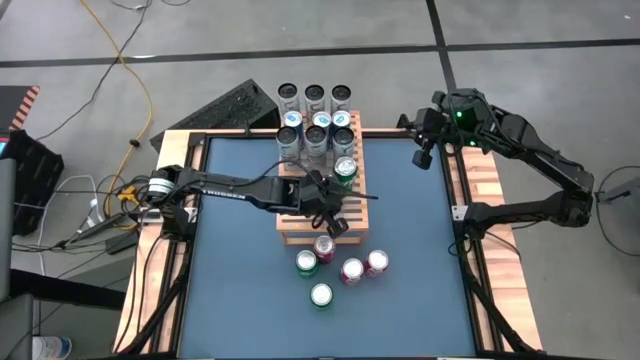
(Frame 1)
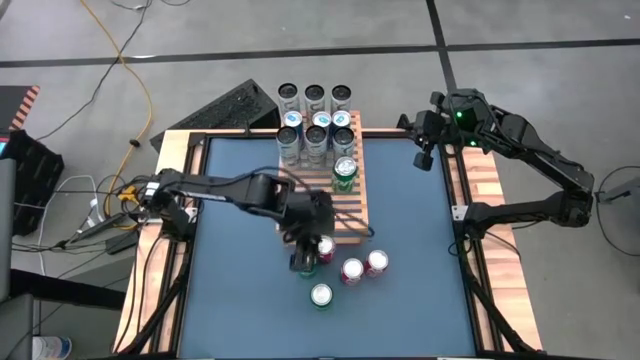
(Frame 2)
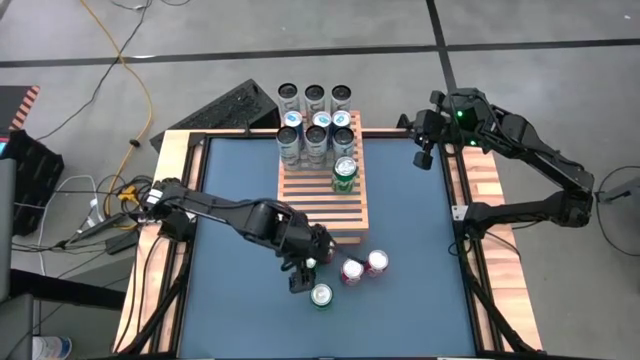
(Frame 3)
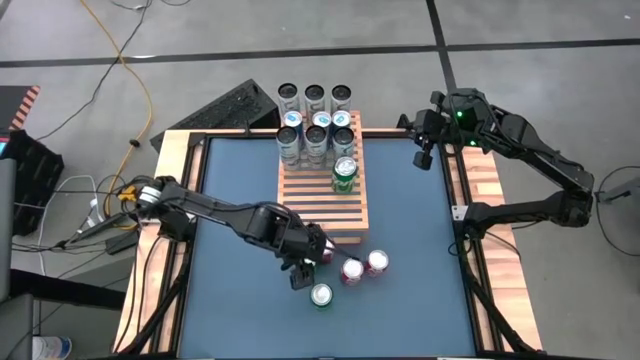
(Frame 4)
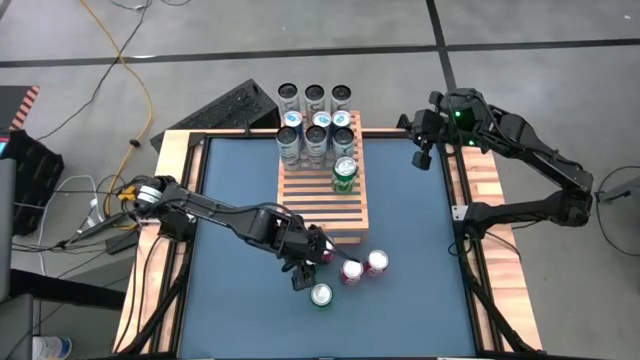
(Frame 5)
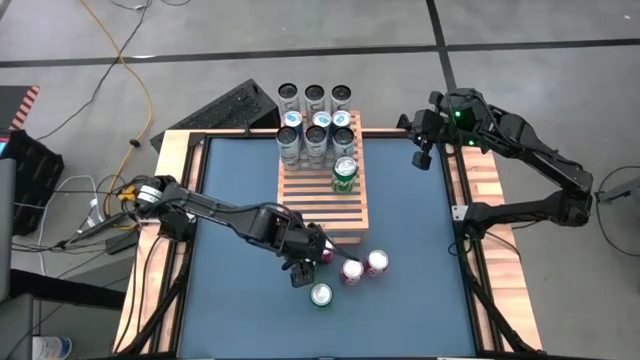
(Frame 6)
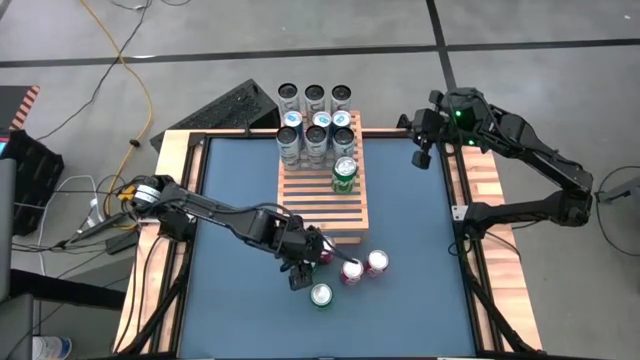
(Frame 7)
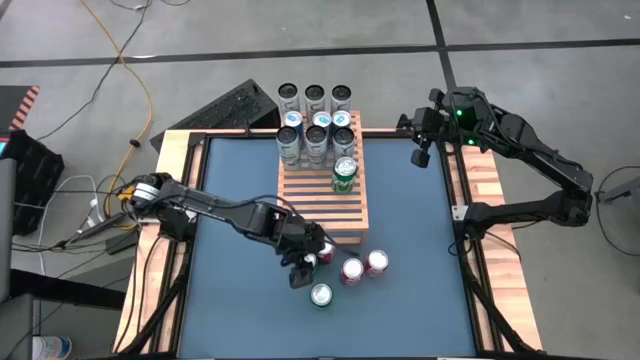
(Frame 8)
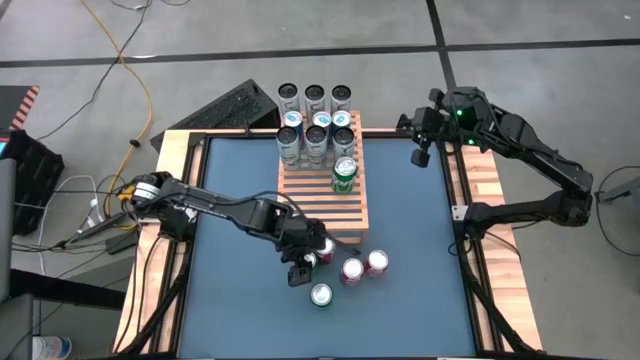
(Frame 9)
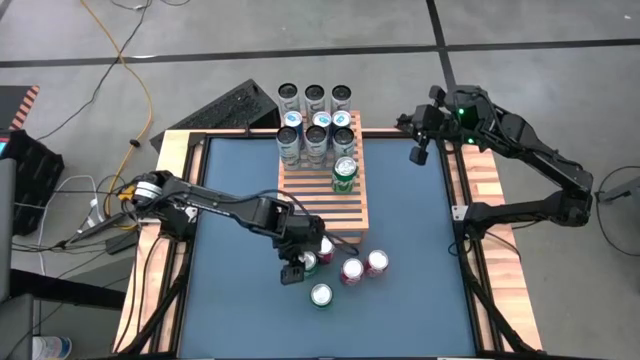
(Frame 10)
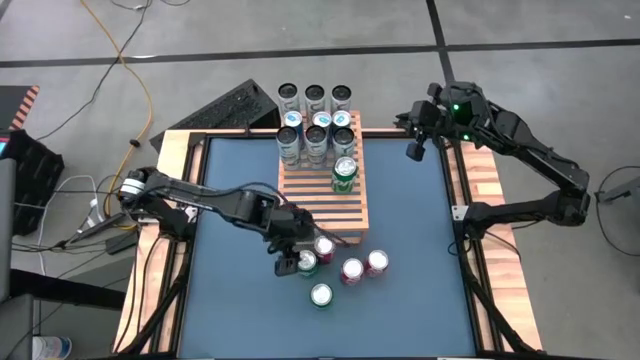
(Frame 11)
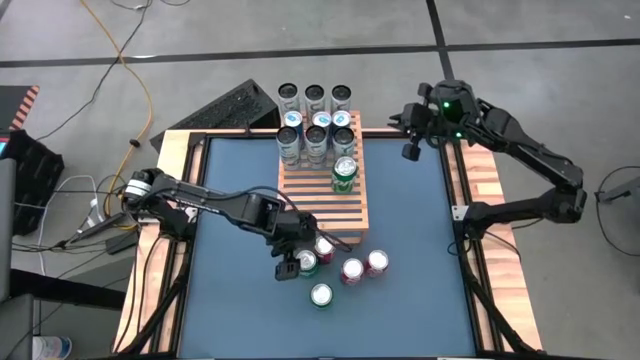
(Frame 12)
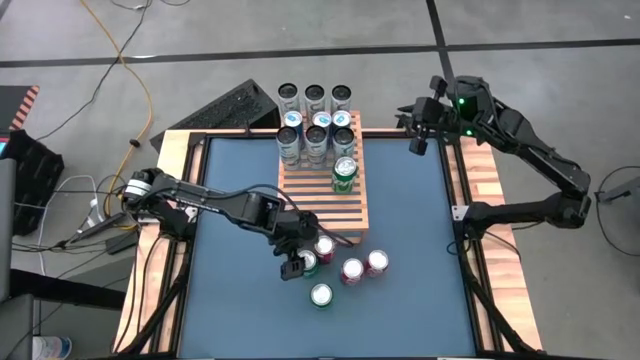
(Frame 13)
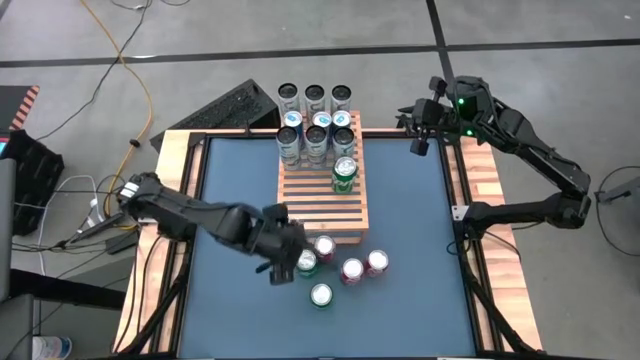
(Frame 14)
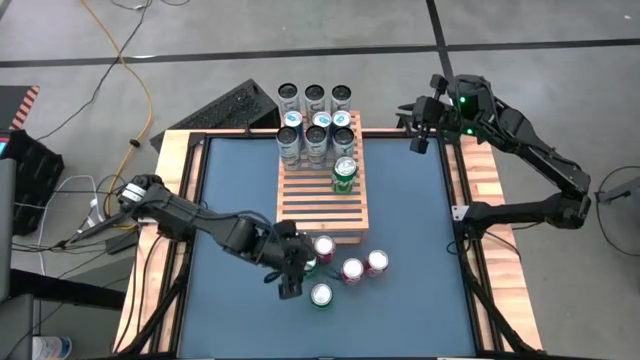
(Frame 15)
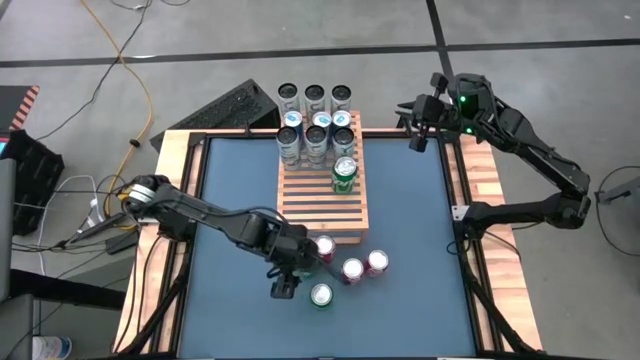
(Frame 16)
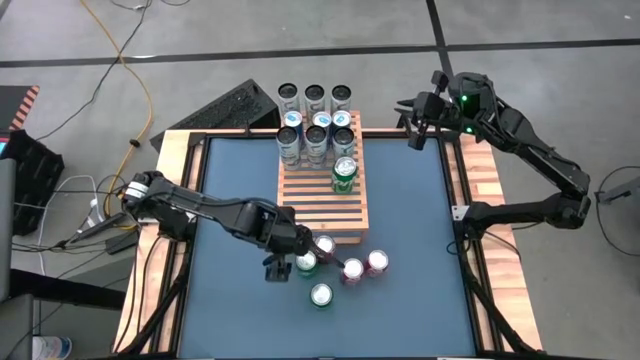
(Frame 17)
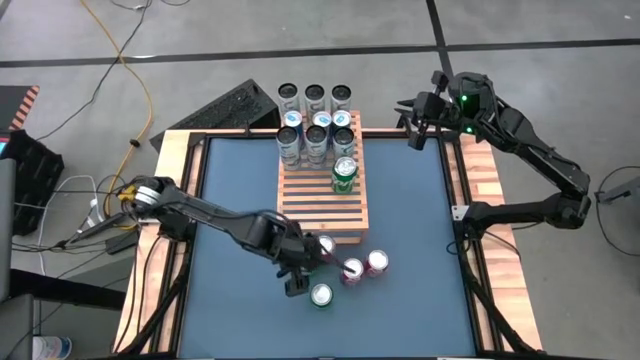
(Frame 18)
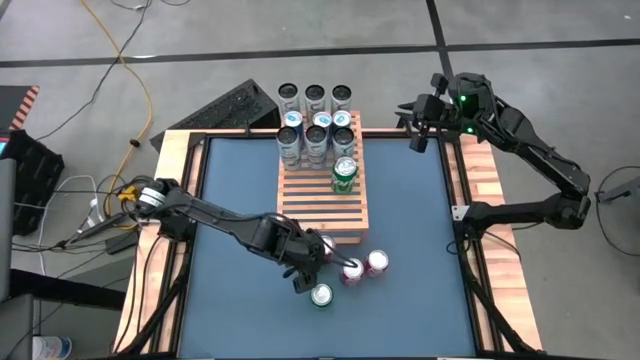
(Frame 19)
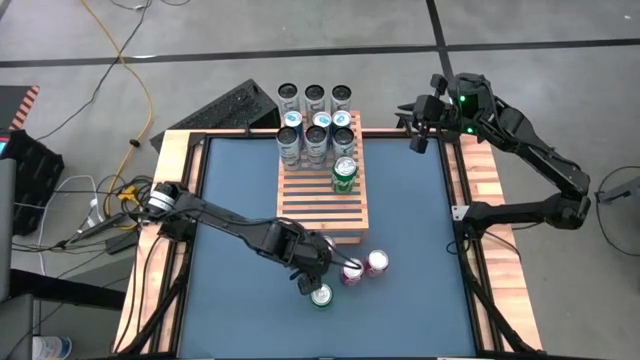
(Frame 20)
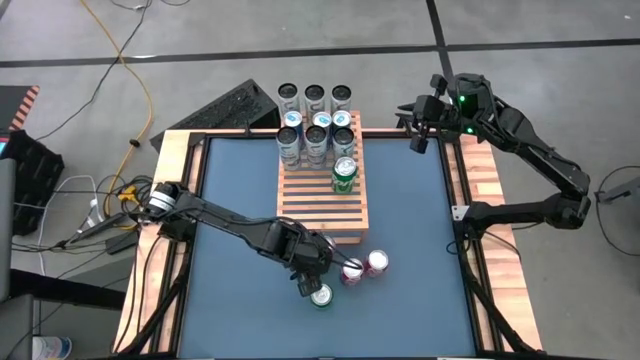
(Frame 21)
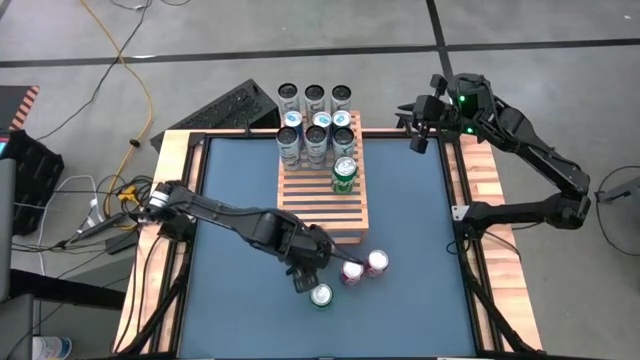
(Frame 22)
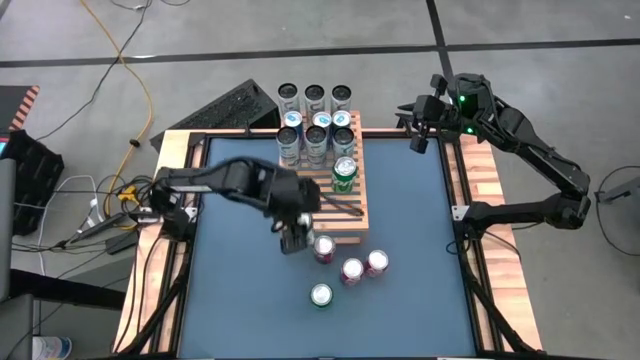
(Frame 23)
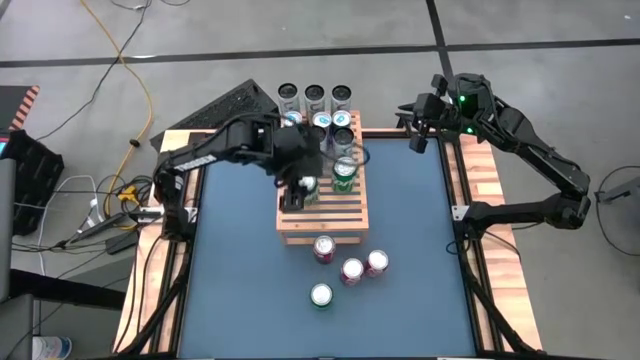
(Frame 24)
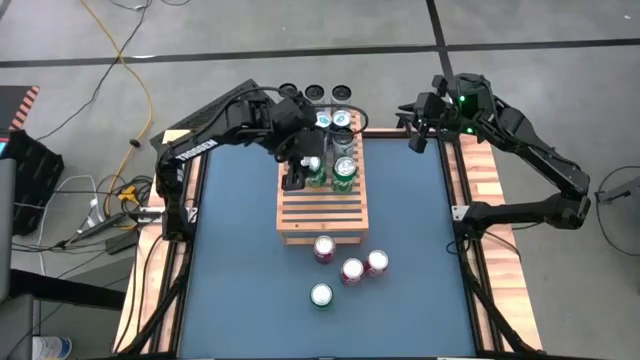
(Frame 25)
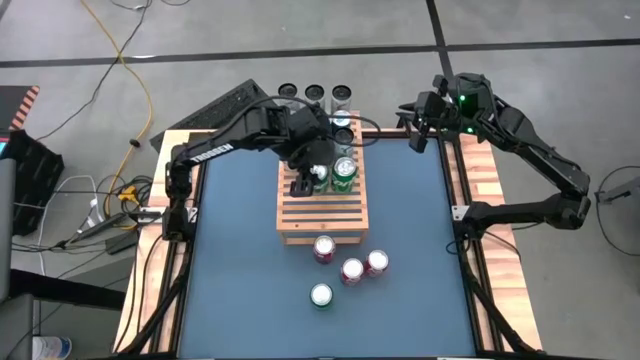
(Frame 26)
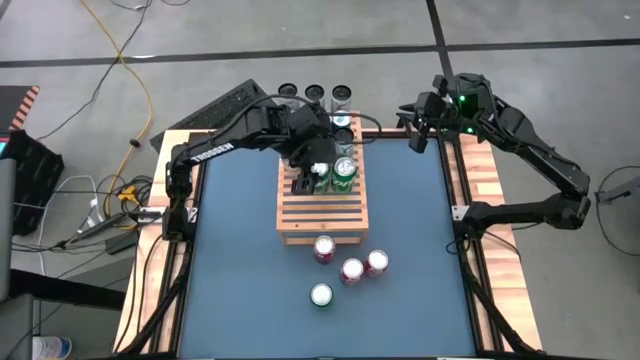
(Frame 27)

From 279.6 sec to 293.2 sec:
Task: Place canned beverage on shelf
Put the top green soda can on the shelf aligned with the other green soda can

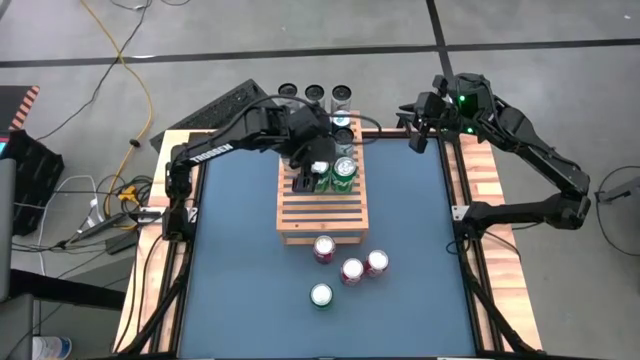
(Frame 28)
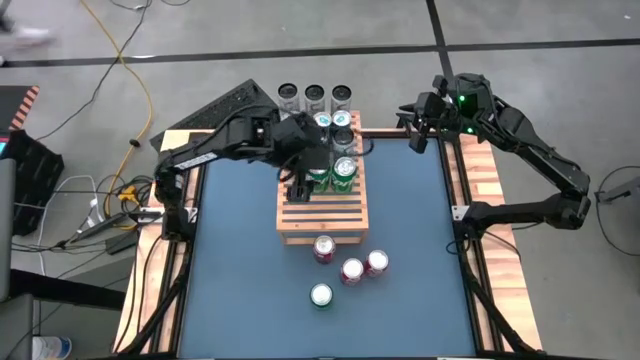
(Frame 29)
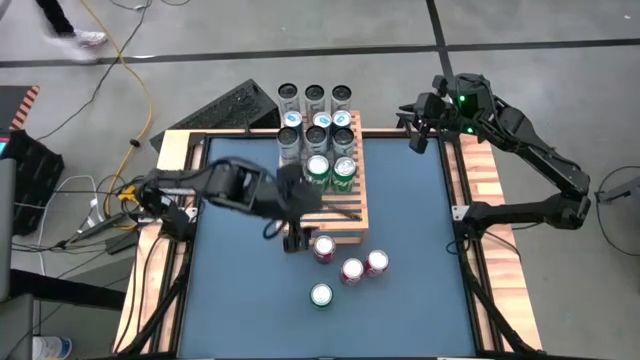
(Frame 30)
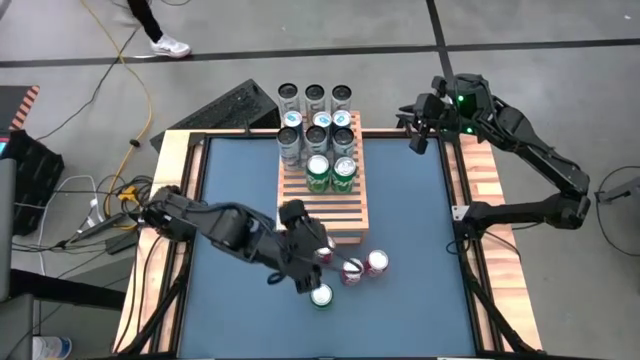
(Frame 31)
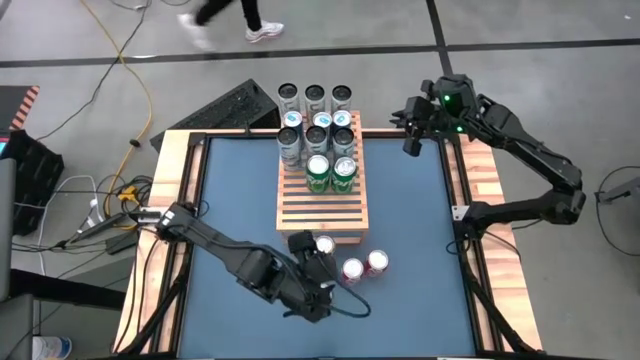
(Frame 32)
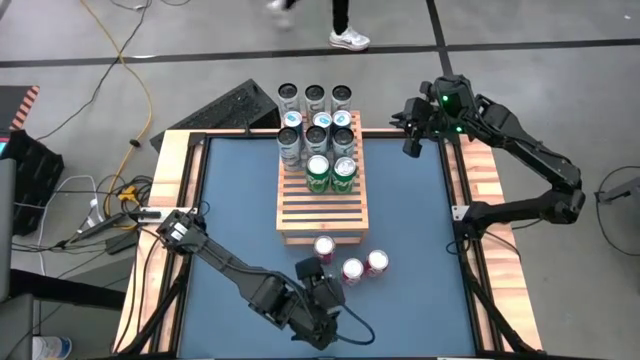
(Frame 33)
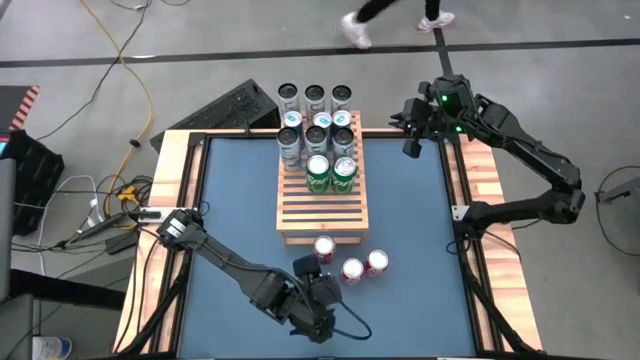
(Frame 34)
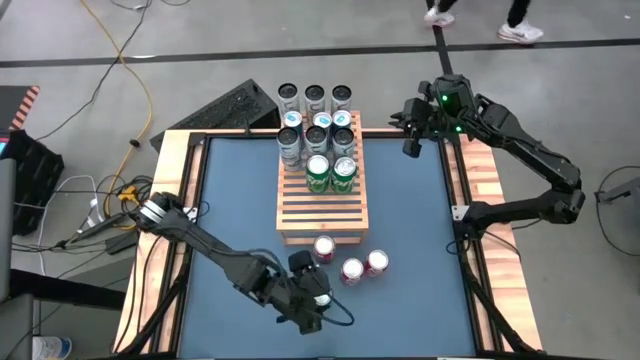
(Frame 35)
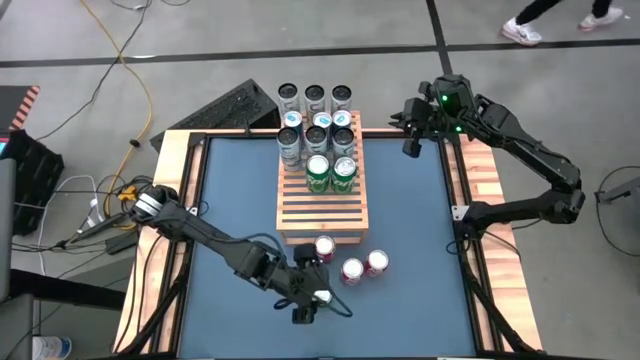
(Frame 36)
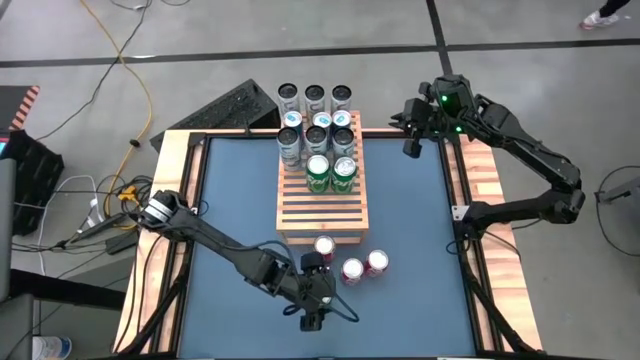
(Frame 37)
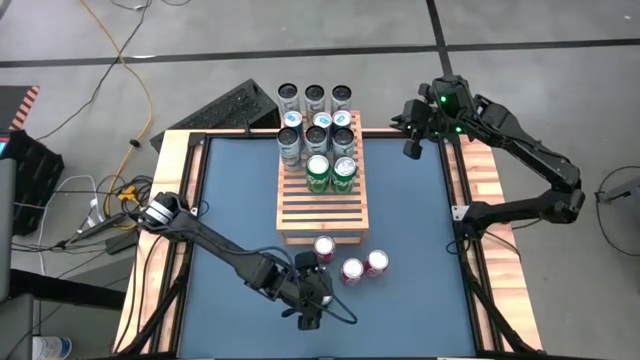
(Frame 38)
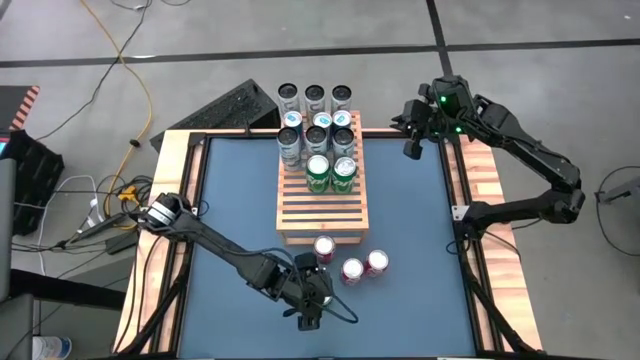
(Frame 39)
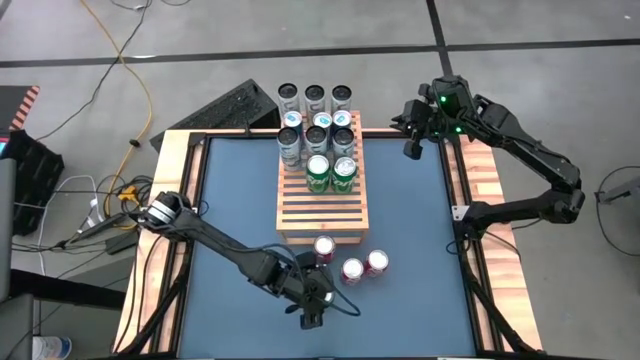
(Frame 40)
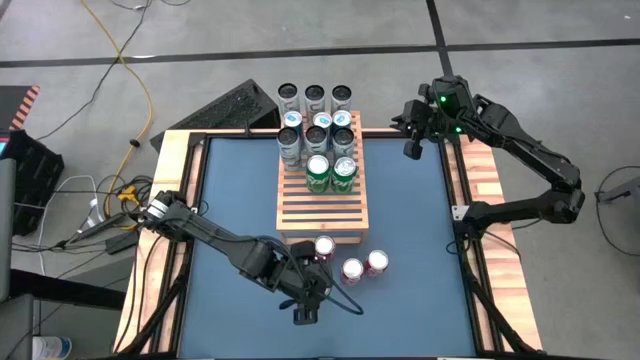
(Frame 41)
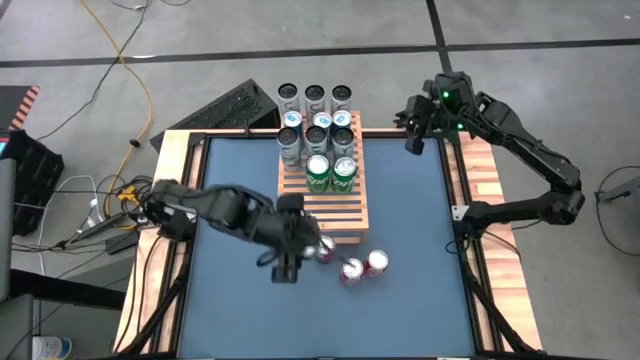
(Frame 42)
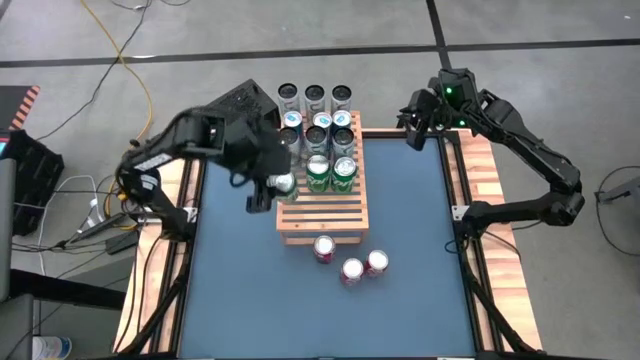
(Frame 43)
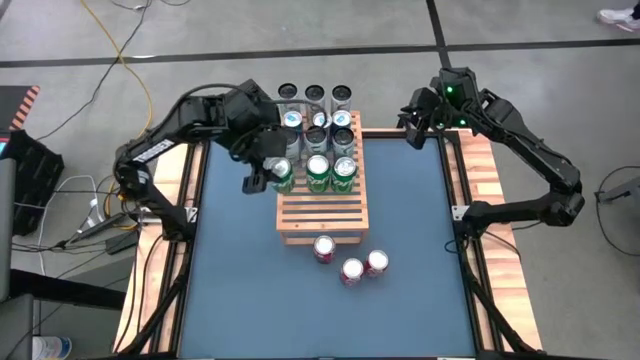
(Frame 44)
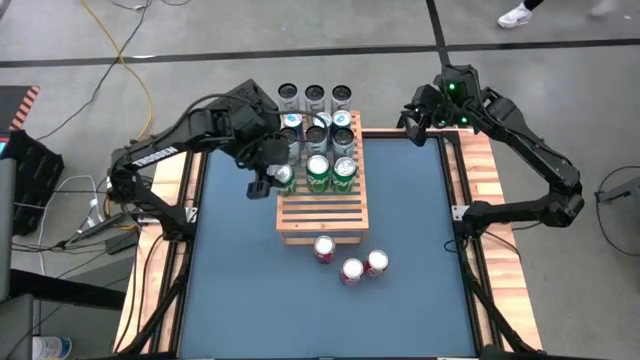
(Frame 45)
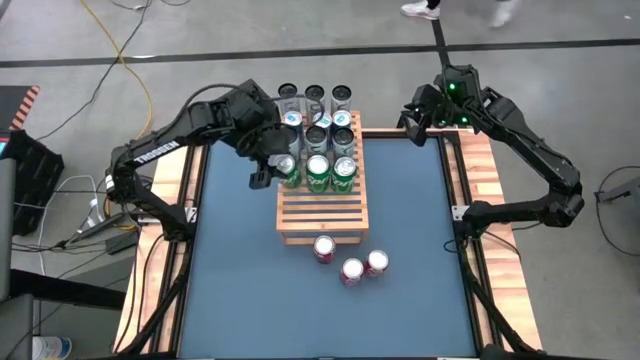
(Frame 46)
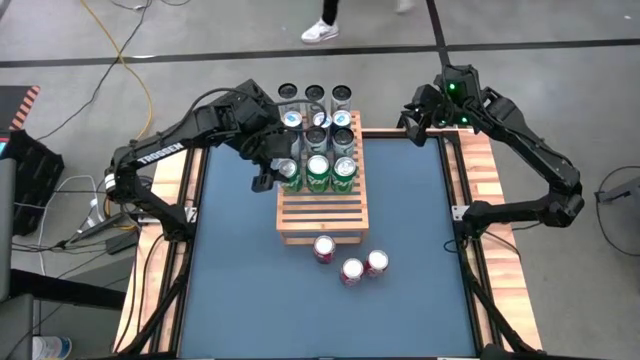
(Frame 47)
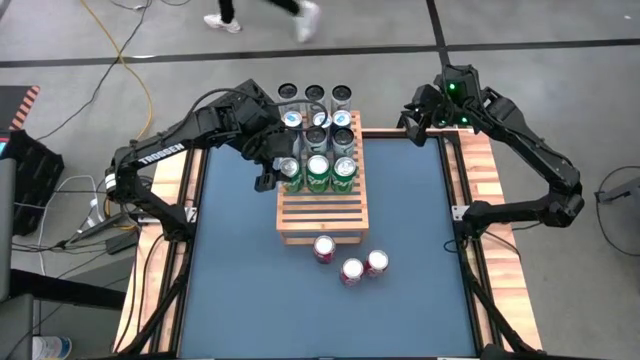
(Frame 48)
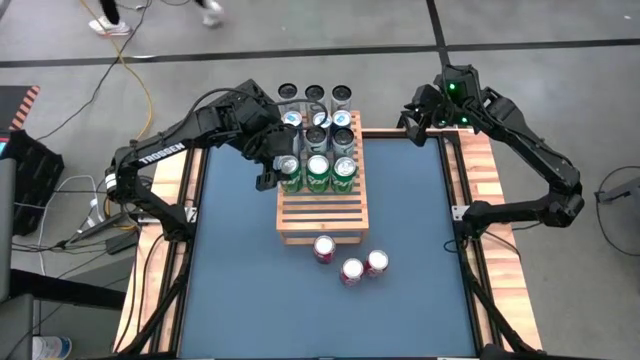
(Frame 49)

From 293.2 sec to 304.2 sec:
Put the green soda can on the shelf aligned with the other green soda cans
